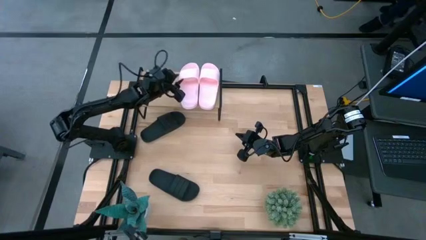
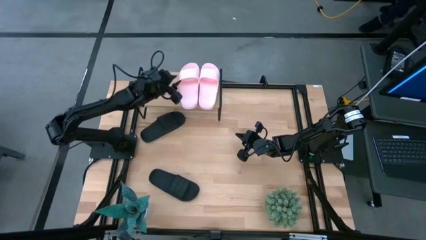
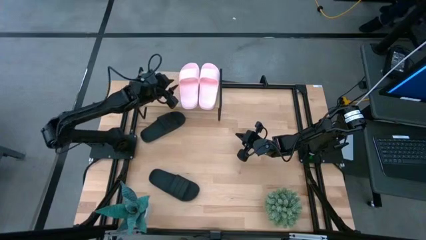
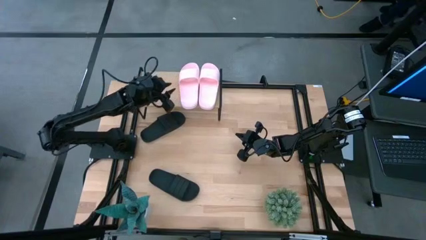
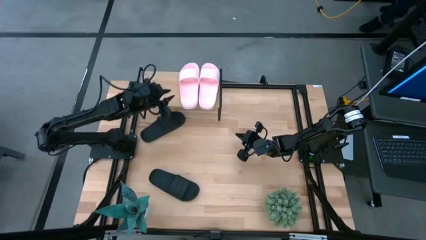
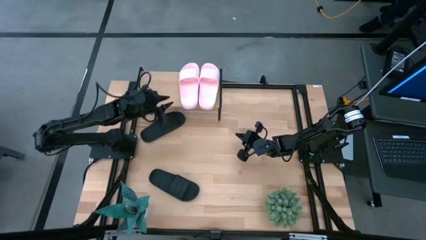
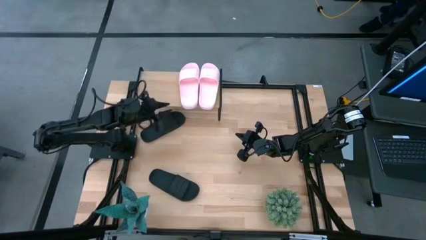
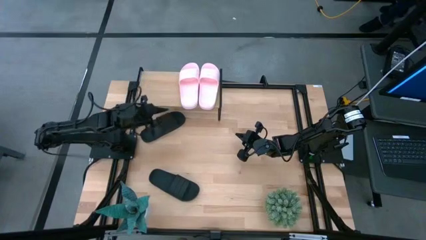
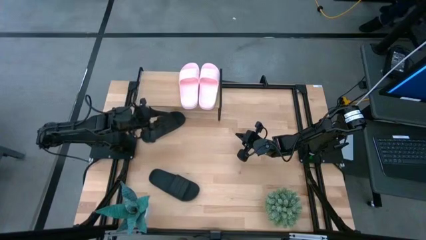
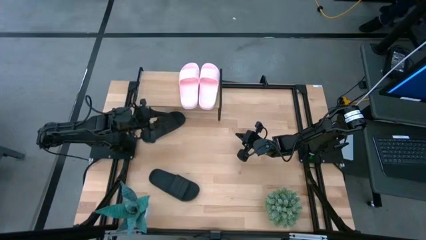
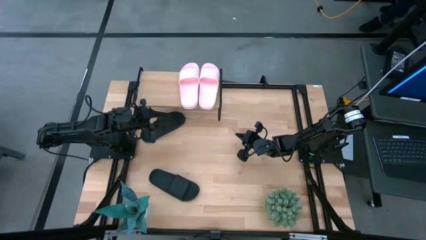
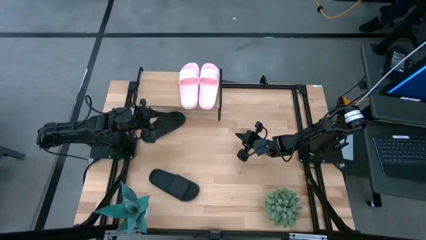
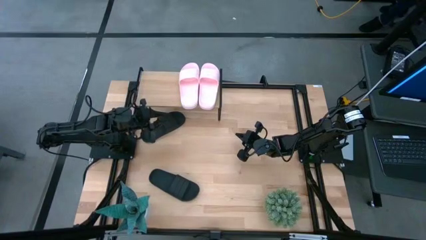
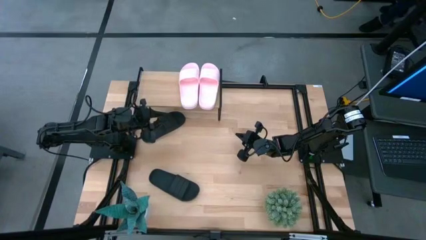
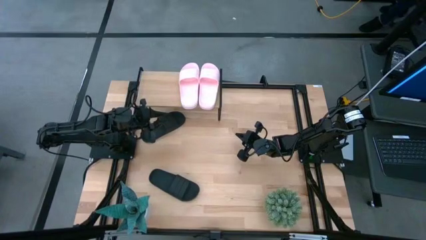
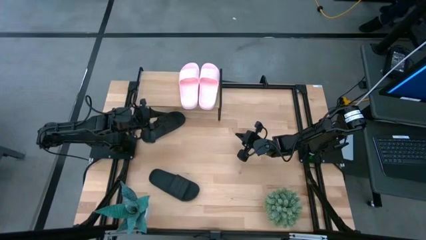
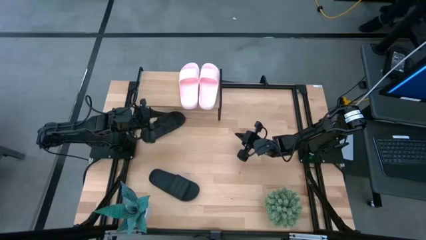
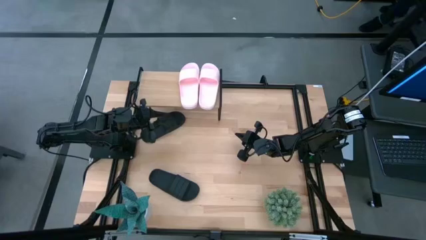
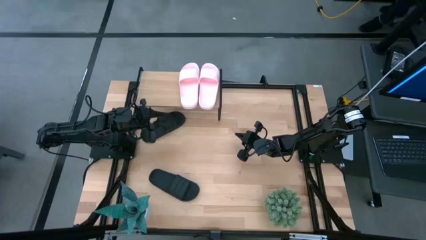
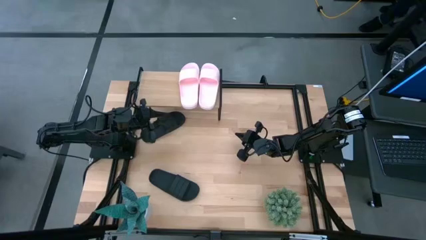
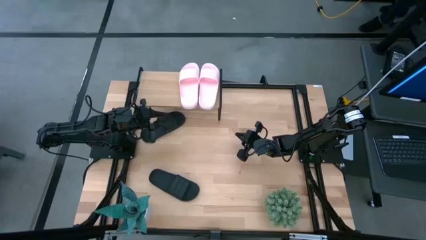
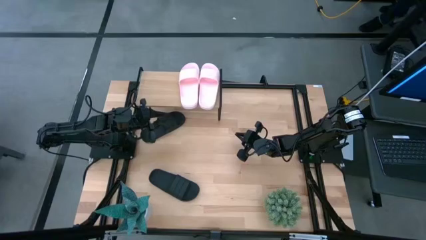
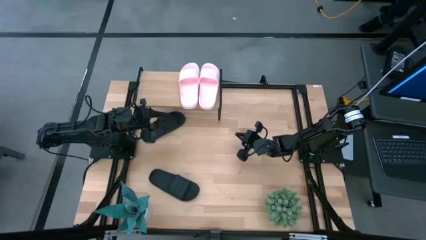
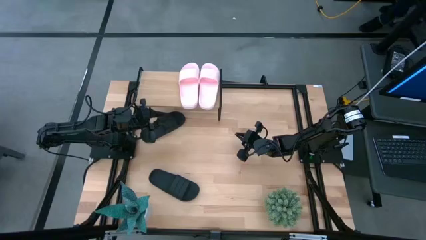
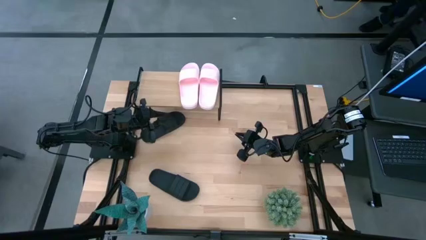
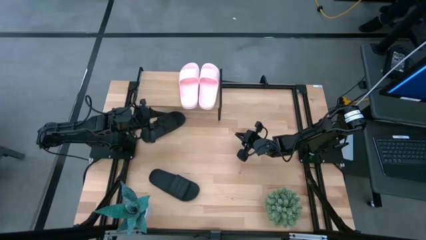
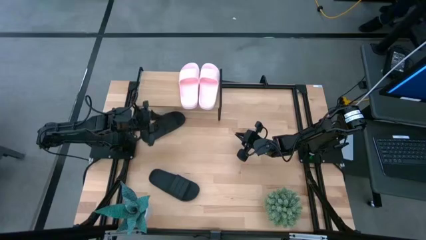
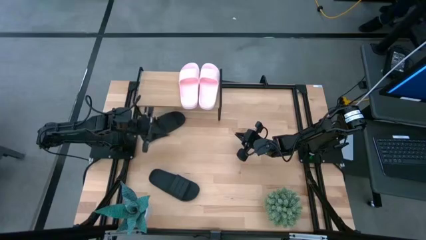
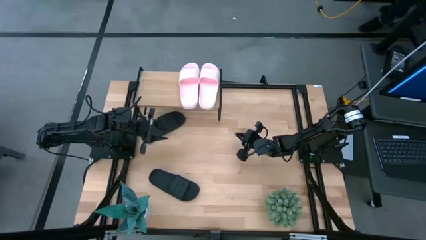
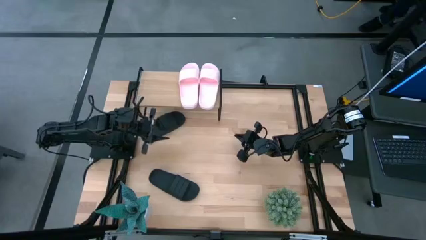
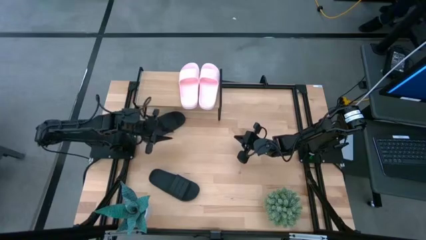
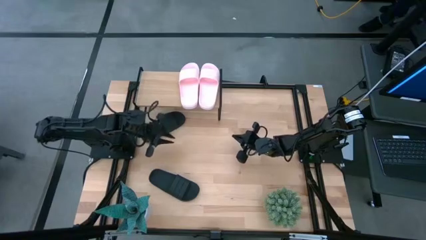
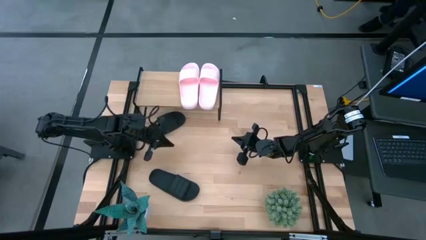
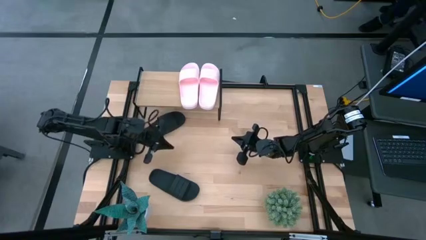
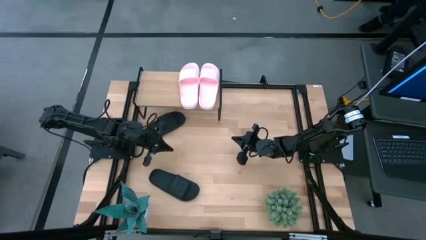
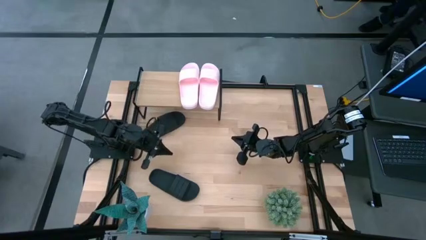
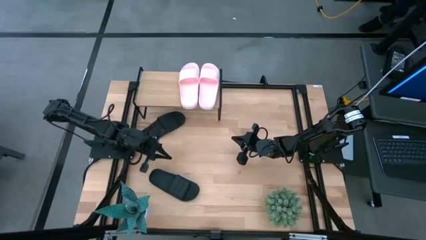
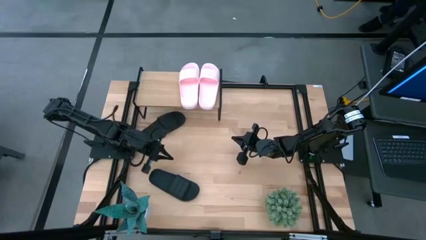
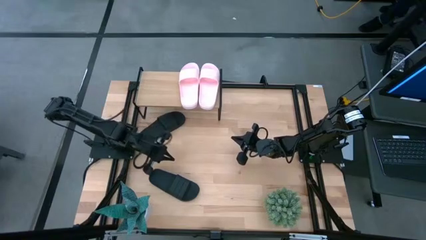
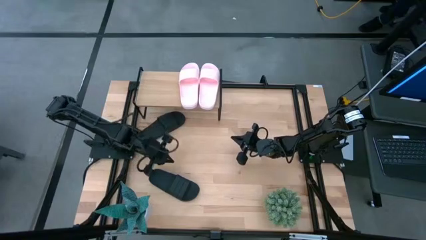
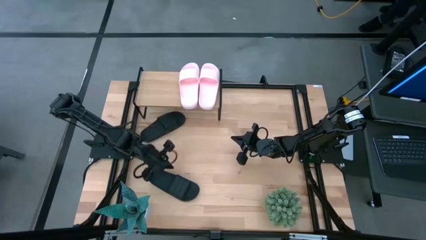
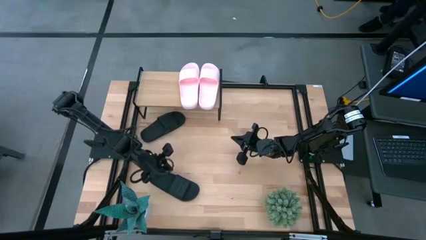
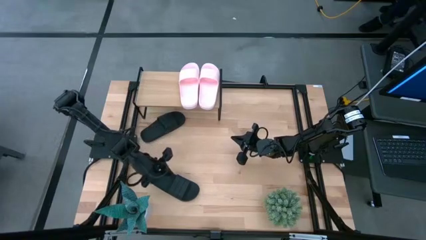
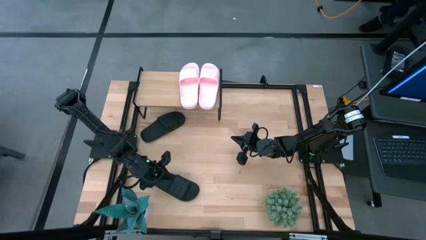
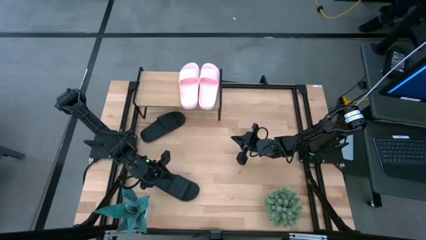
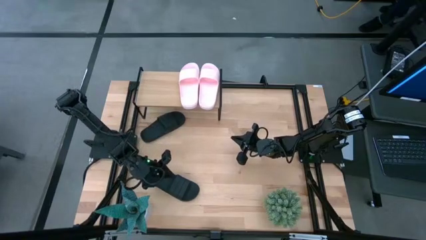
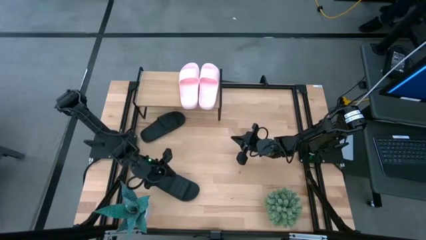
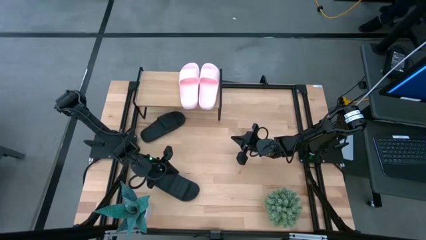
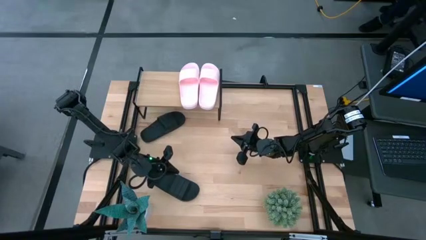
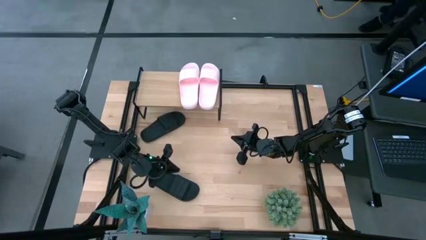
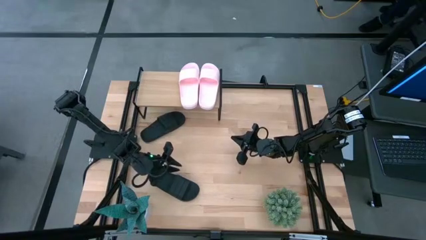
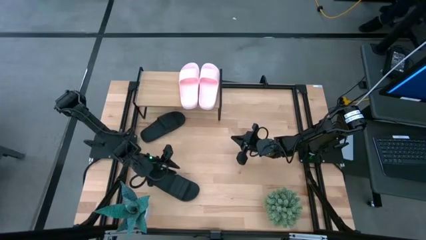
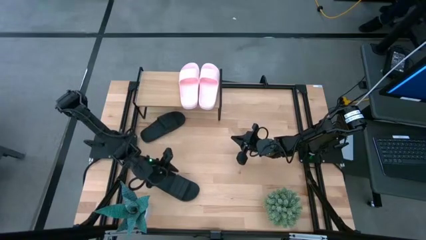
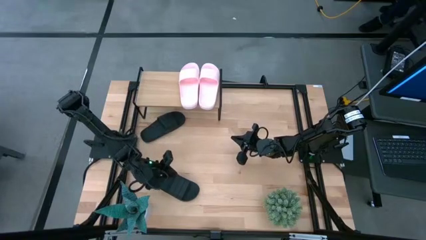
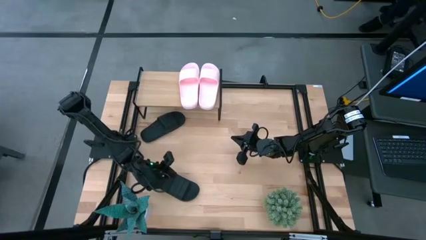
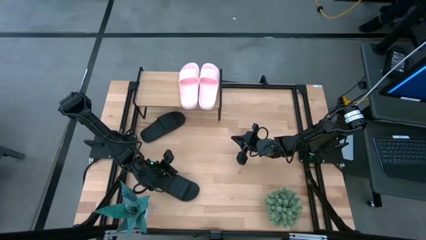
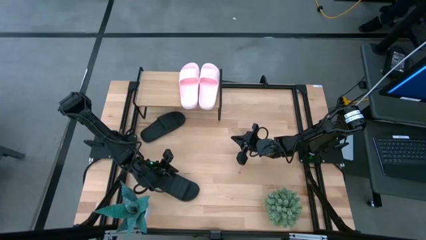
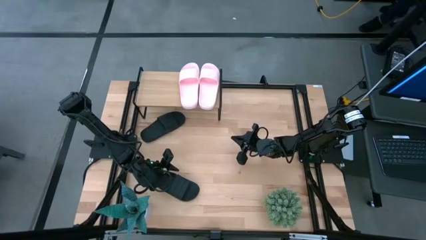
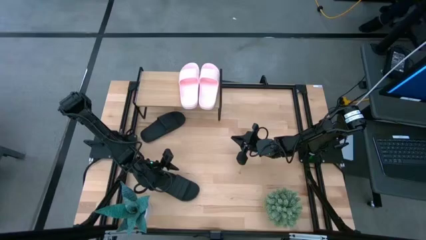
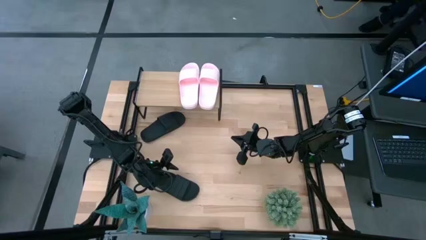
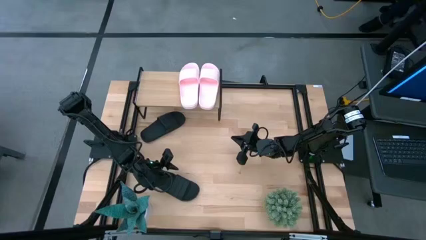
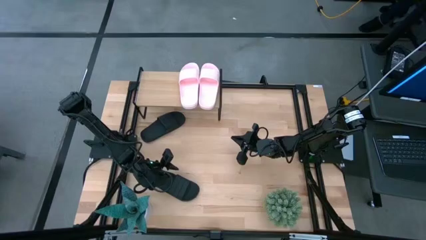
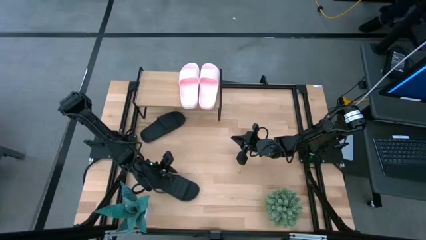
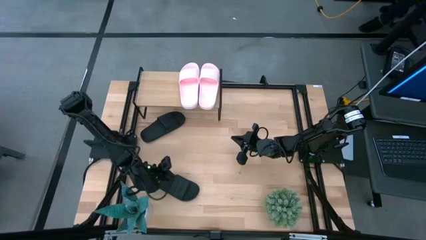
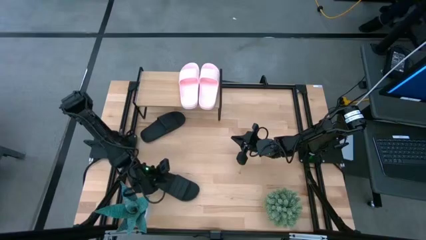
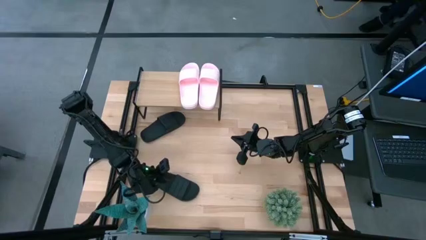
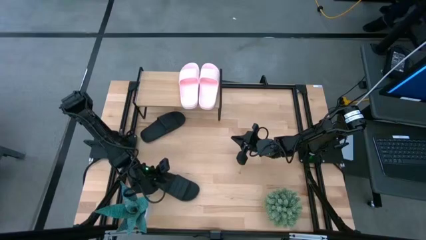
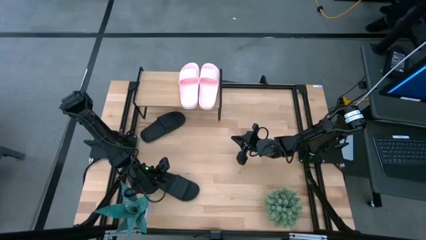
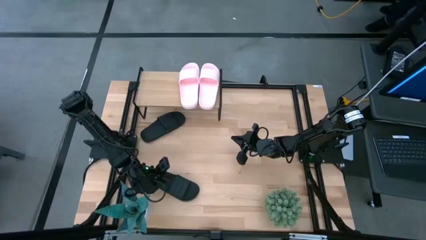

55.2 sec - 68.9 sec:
Task: Pick and place slides into the shelf
Put the bottom black slide on the shelf
